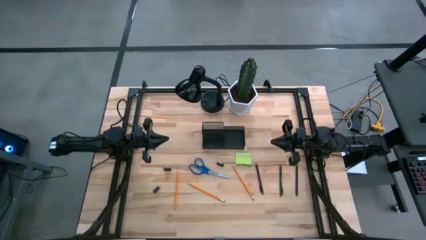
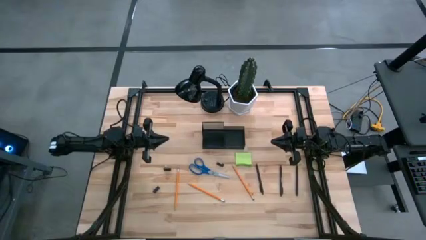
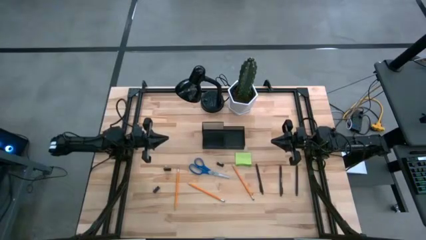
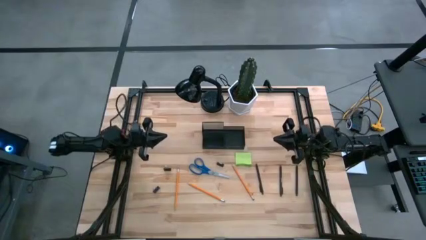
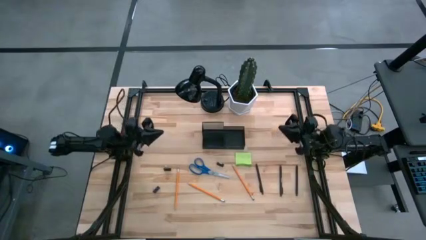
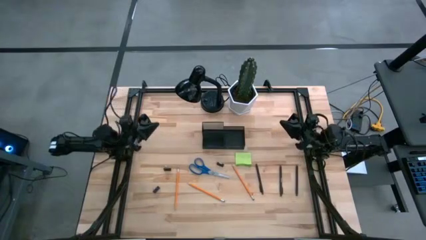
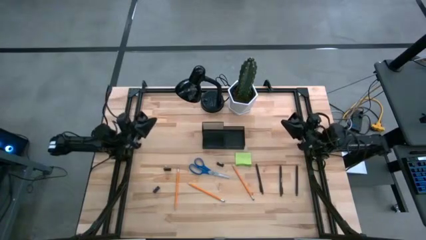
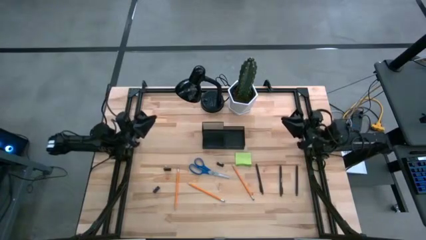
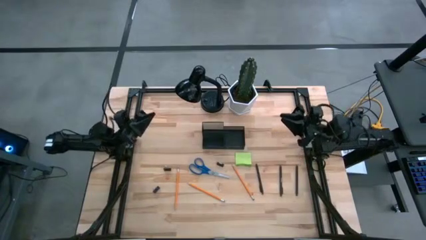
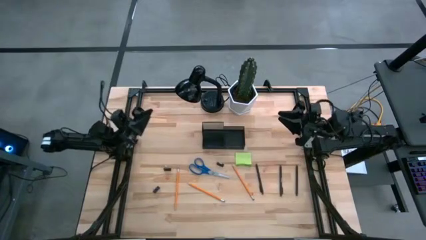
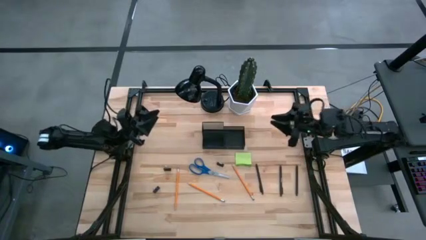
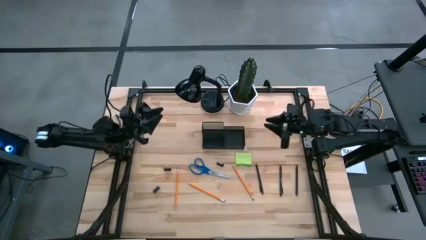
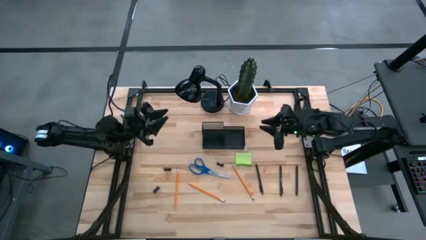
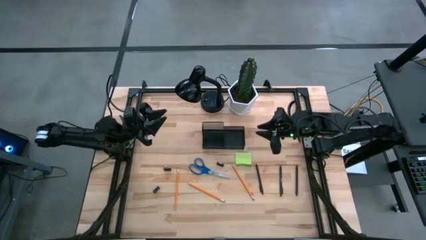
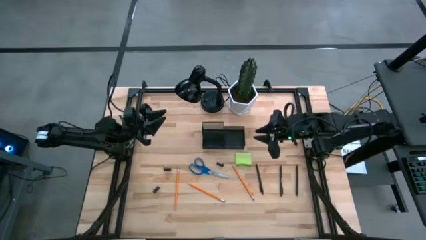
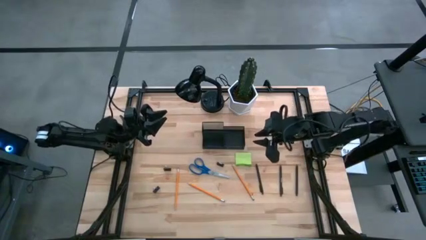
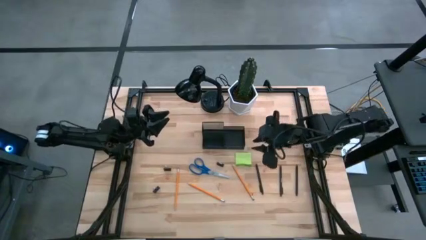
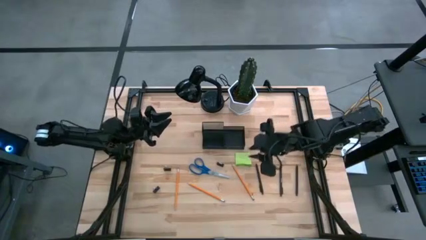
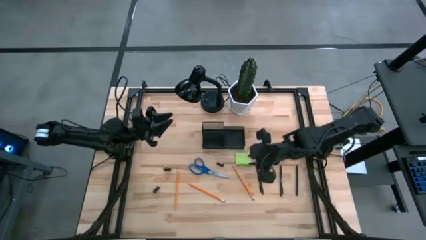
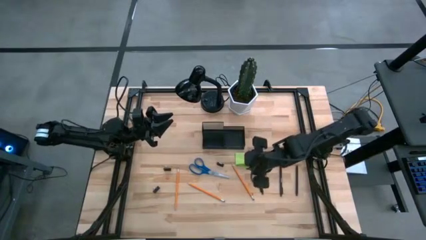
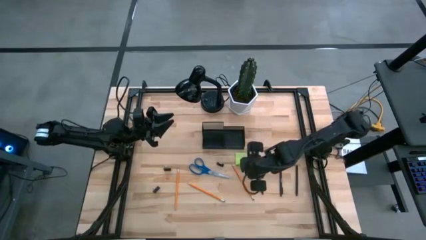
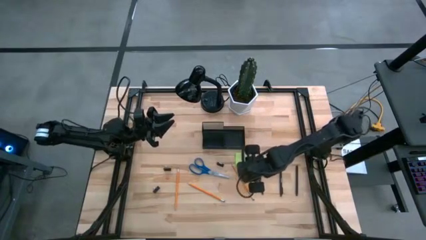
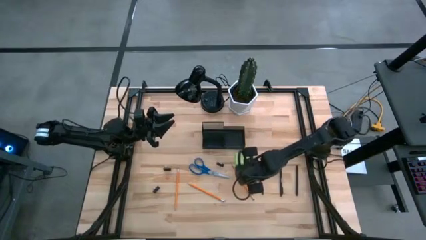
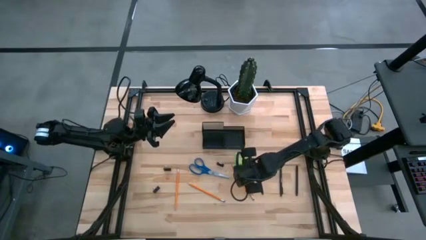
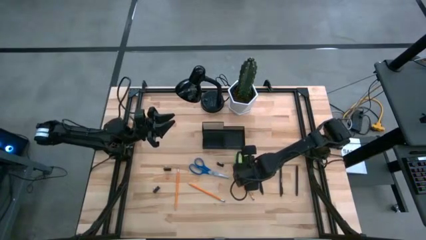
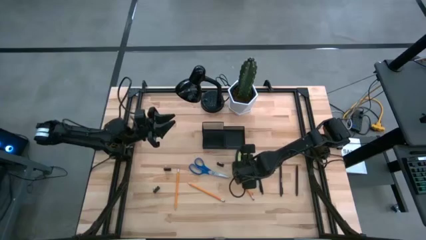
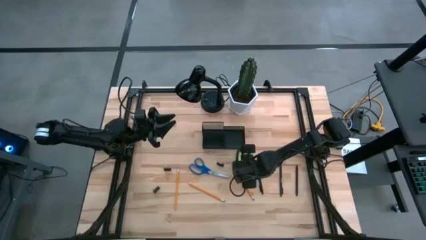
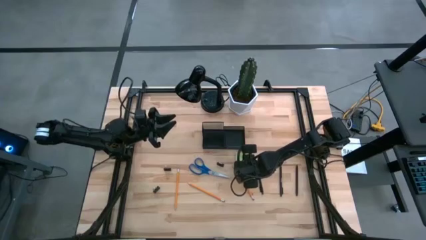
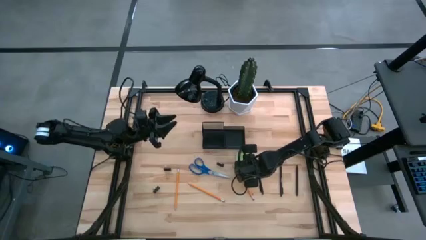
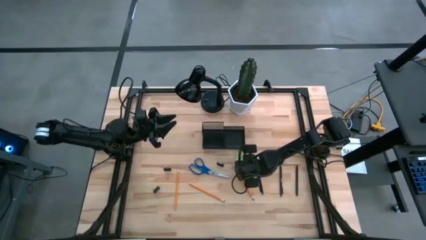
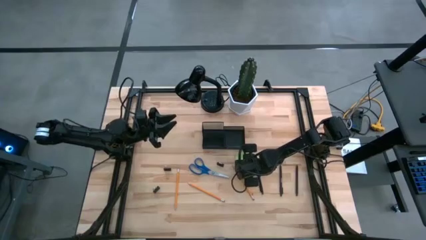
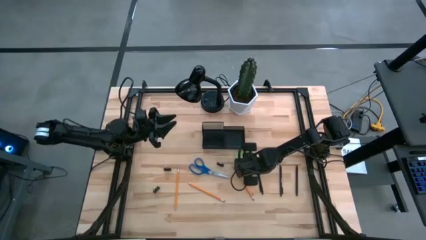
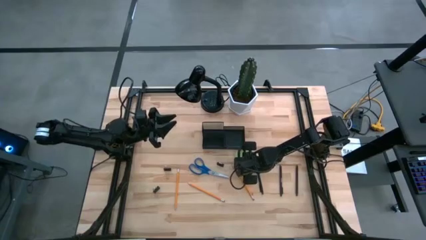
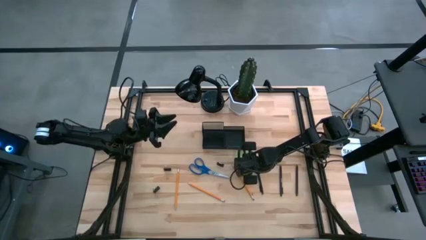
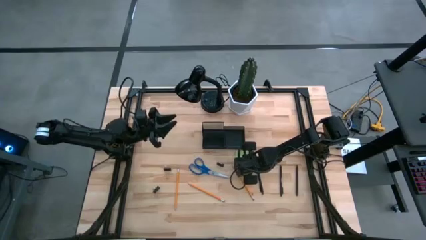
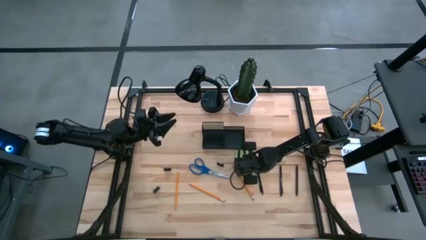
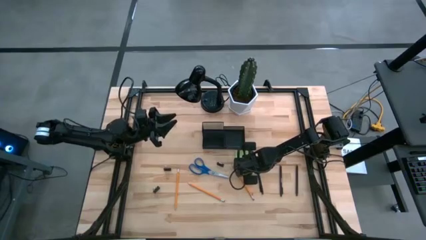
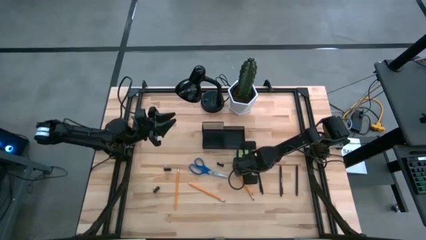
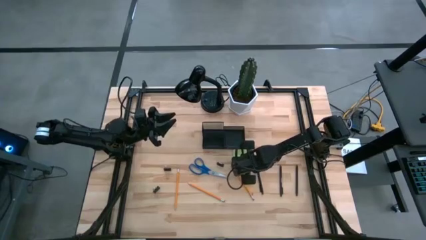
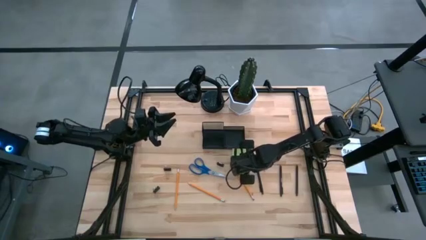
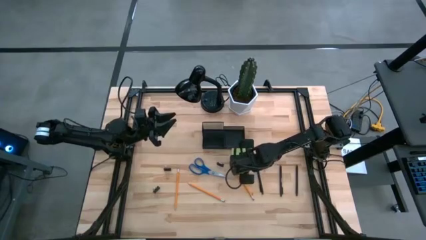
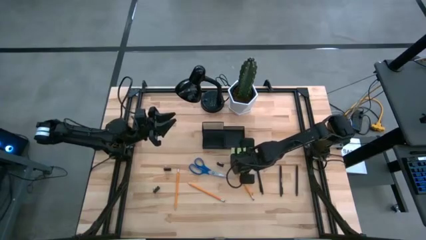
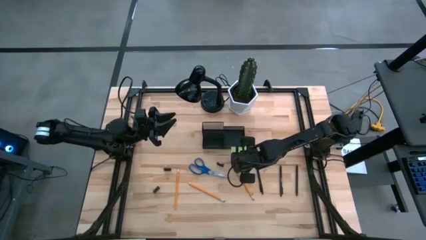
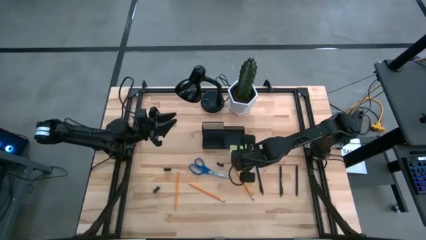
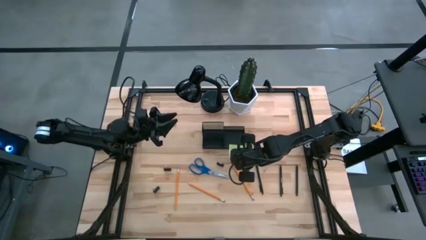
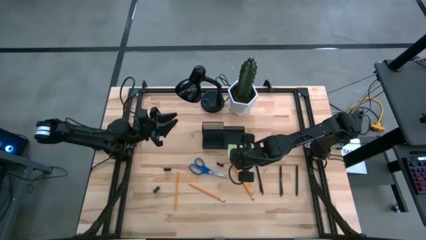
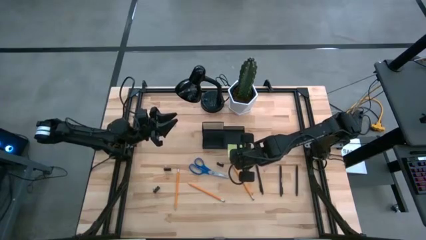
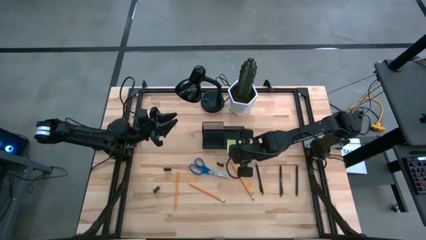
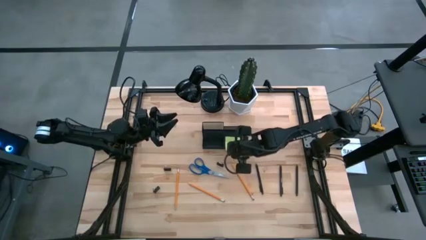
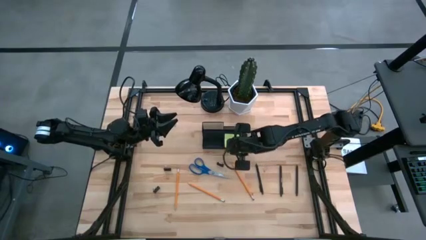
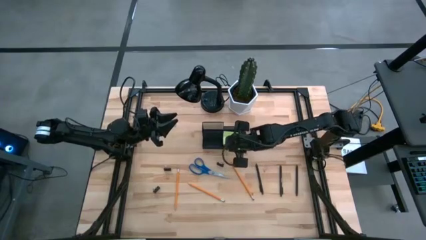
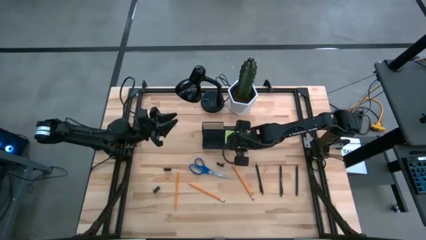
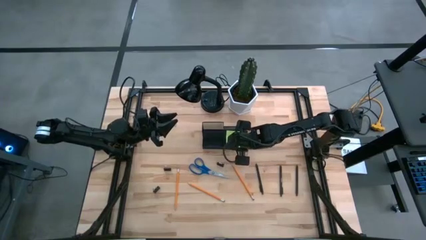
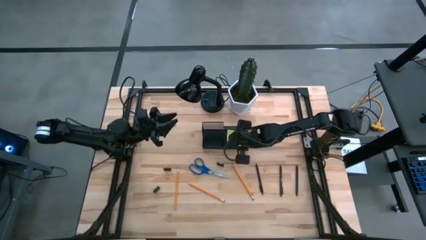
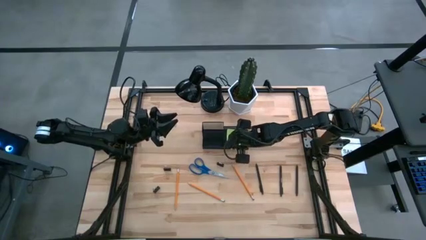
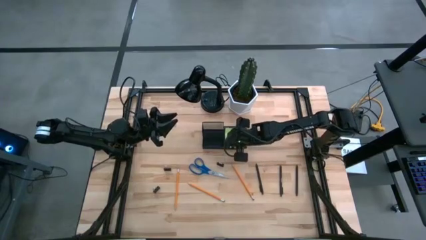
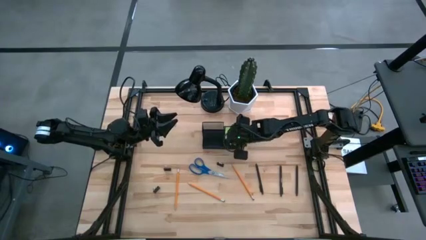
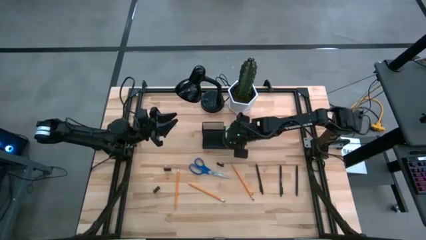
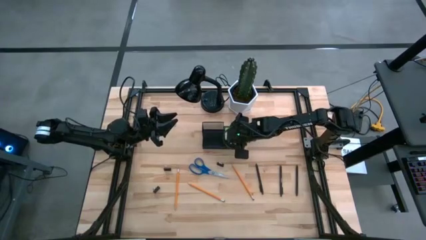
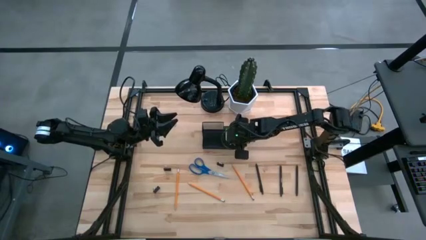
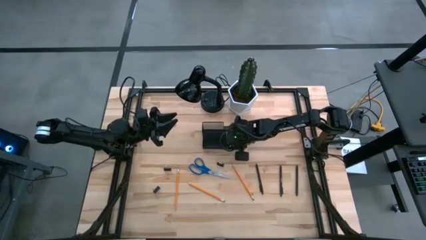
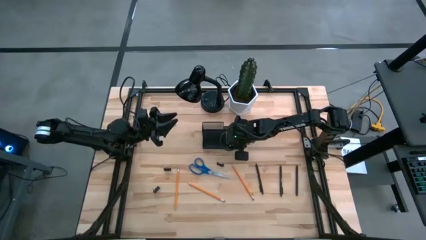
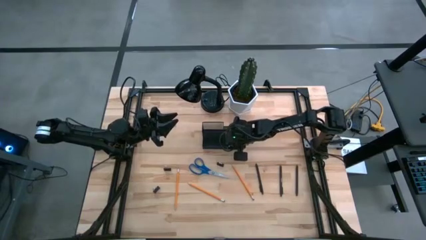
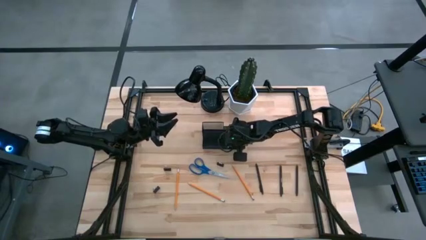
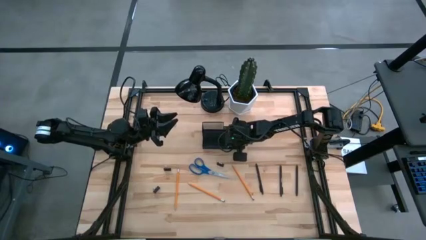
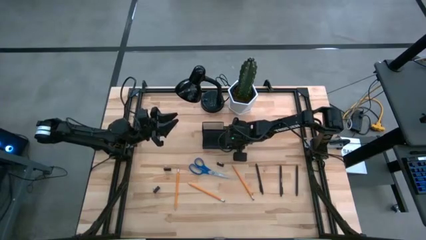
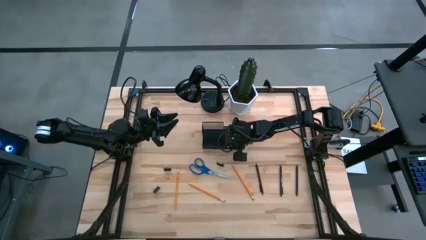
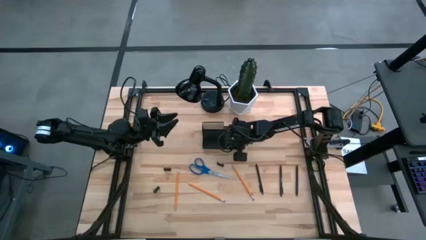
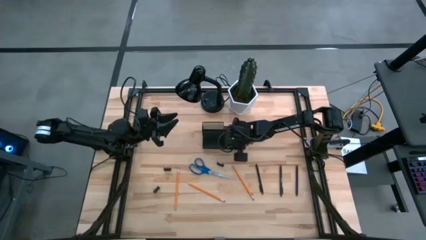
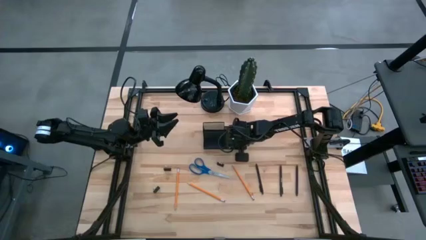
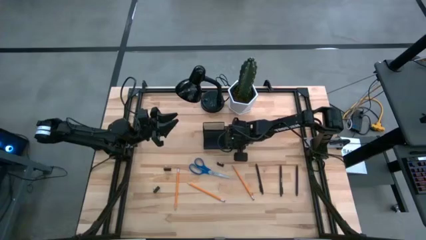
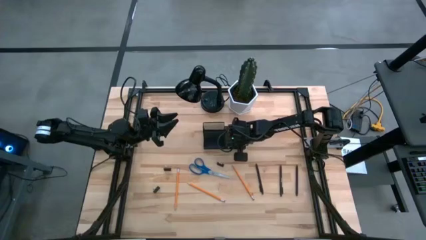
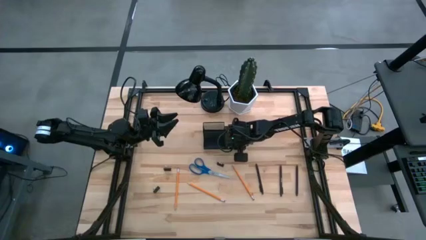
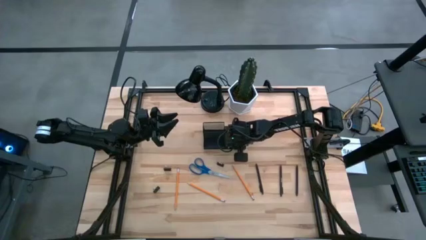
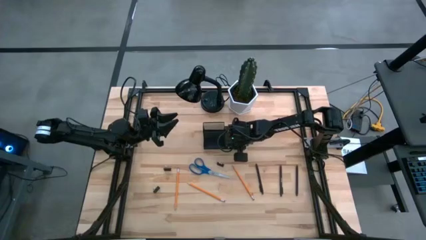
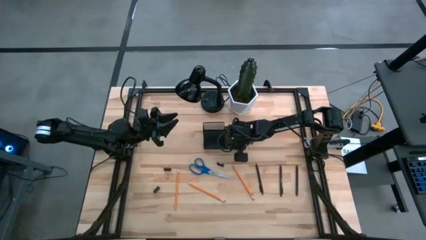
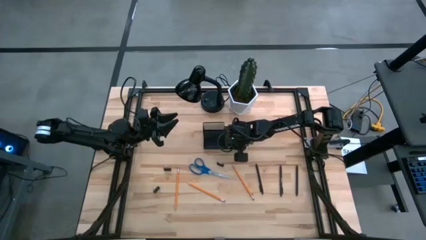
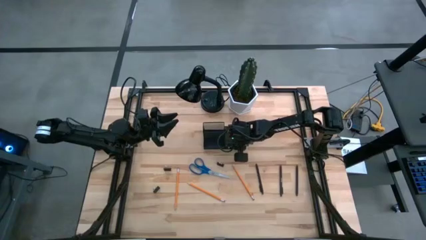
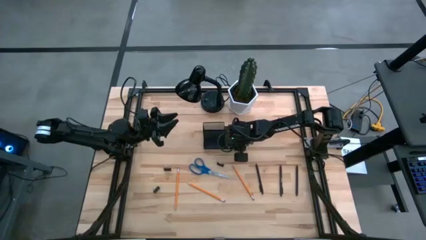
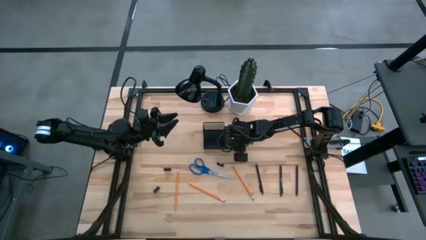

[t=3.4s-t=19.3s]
Task: Pick and place office supplies into organizer
Put the green sticky notes into the mesh desk organizer
